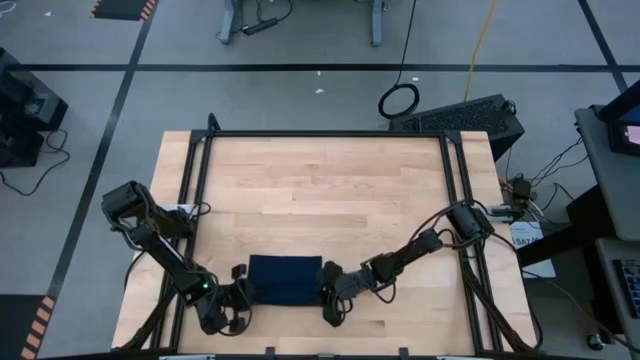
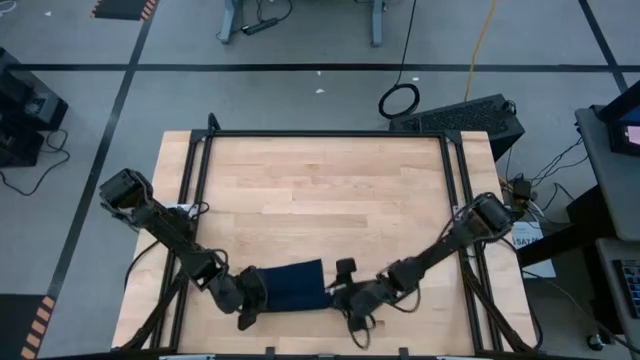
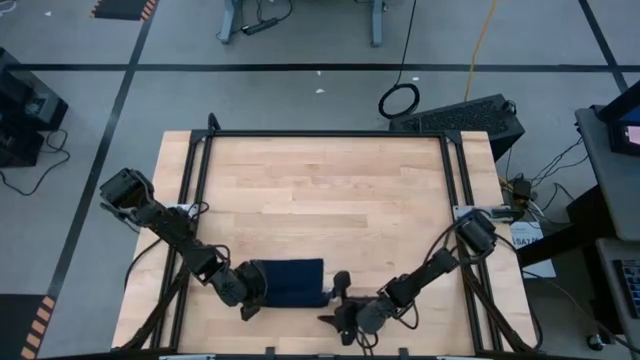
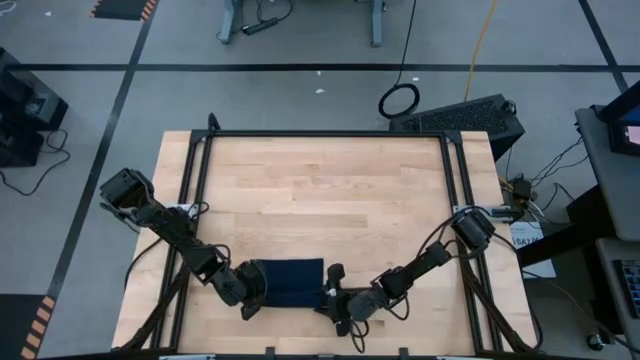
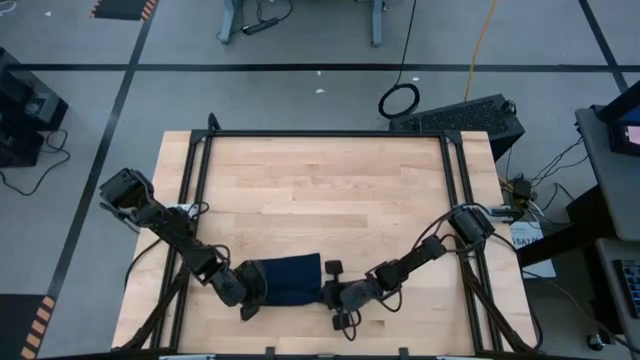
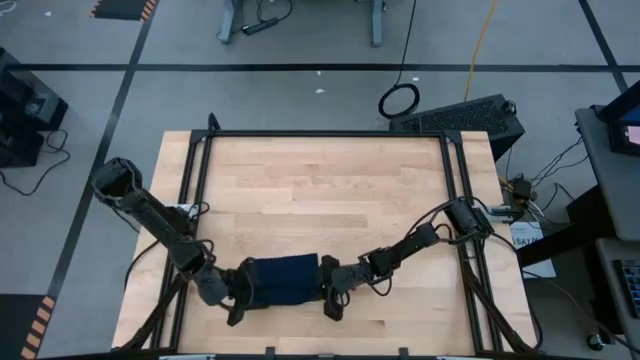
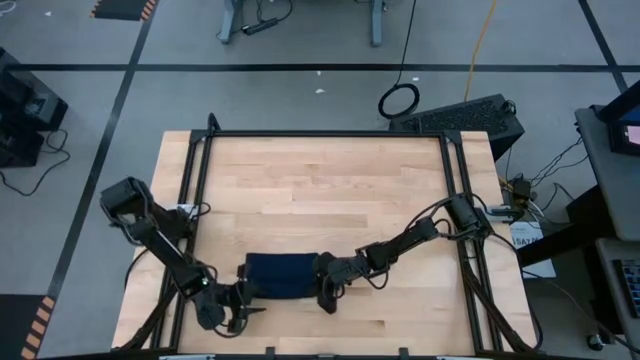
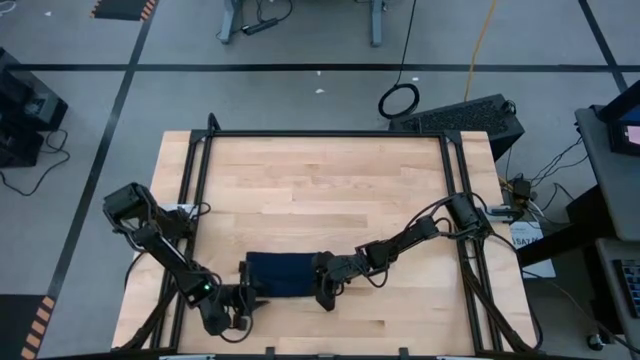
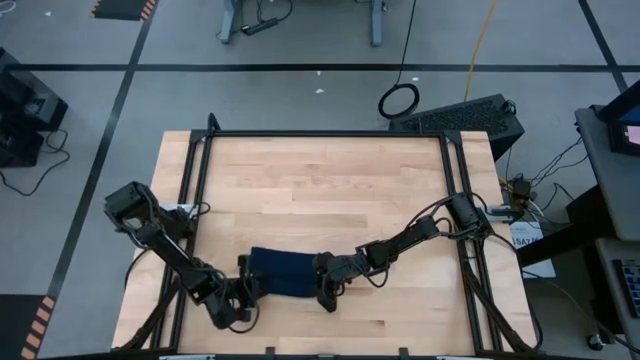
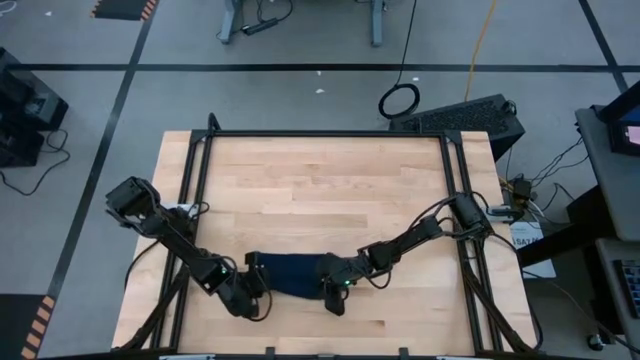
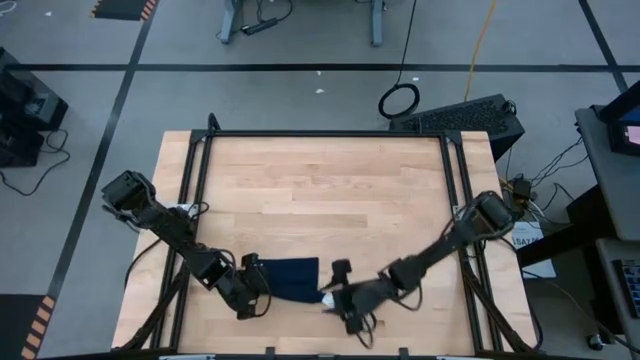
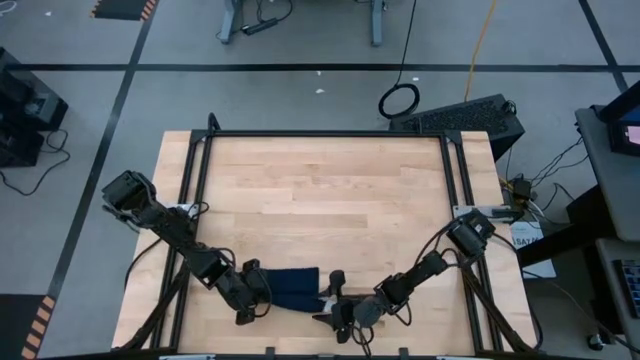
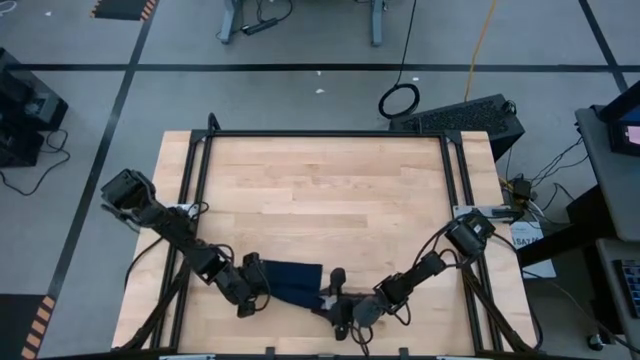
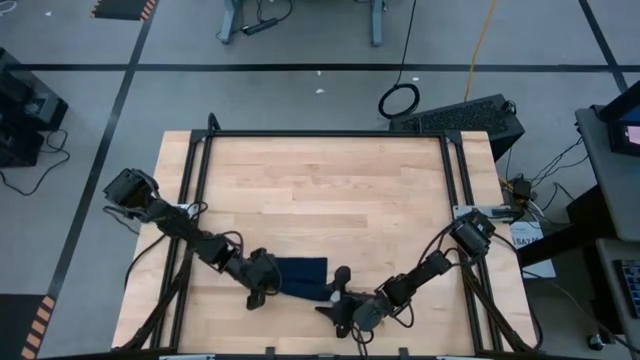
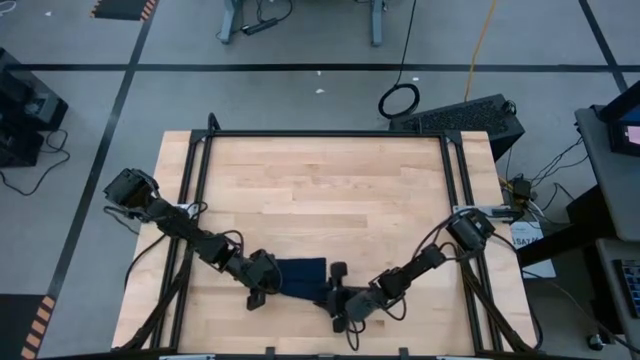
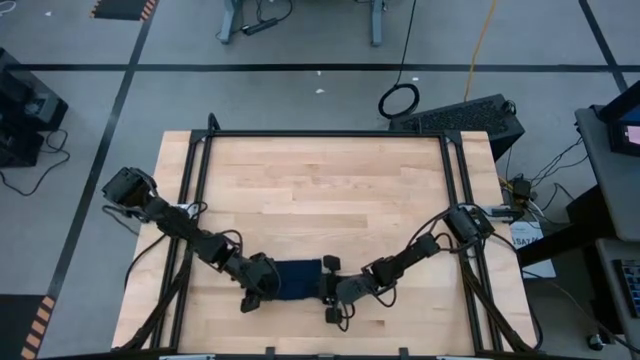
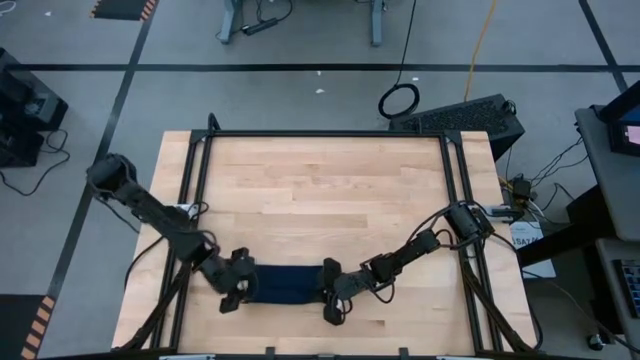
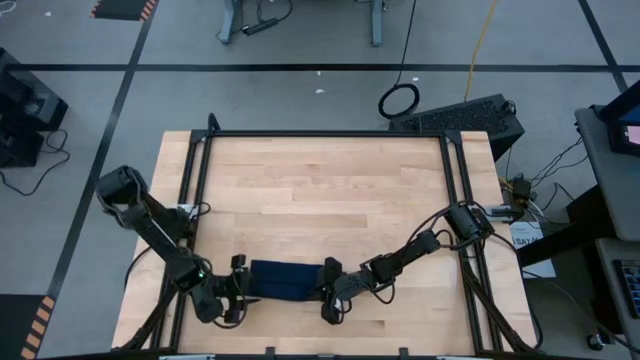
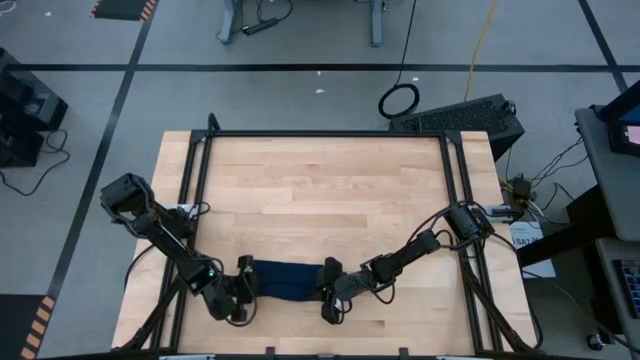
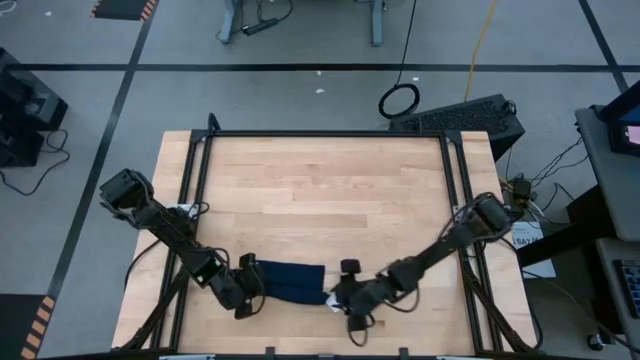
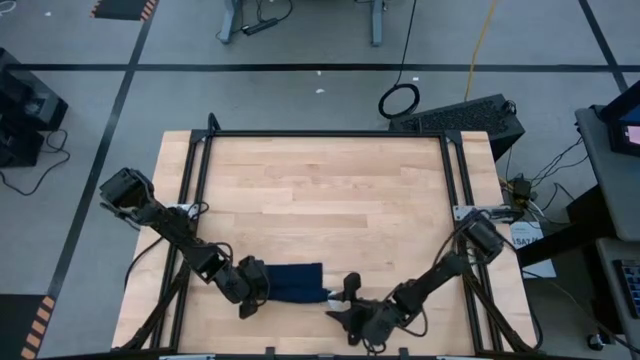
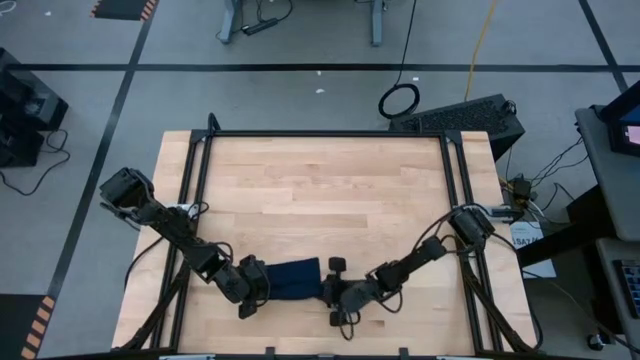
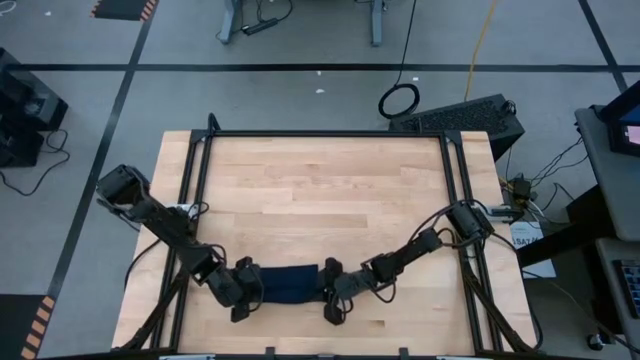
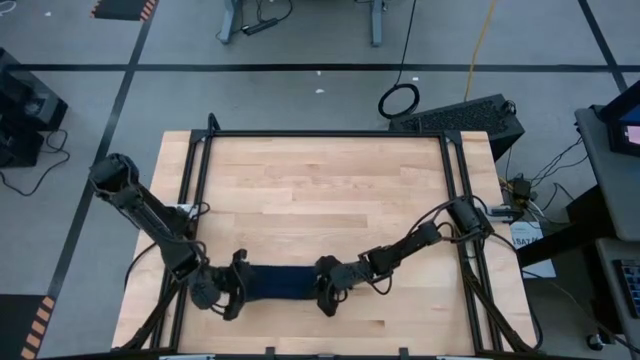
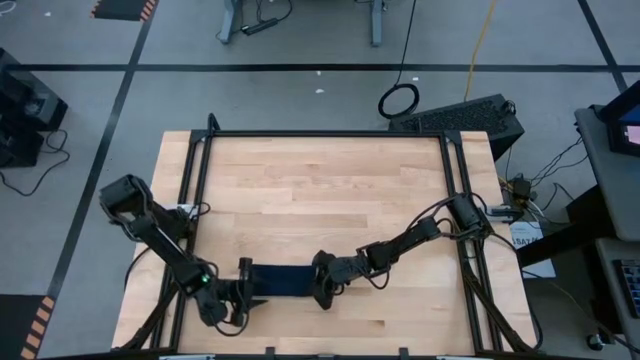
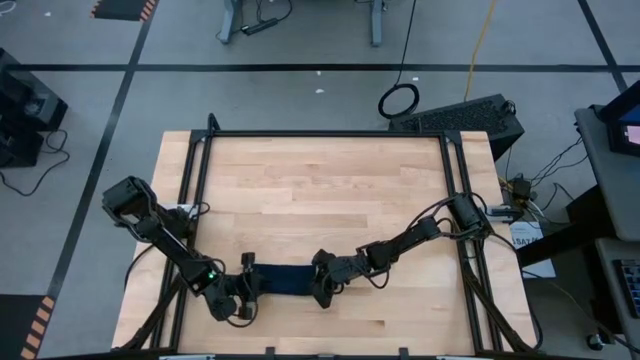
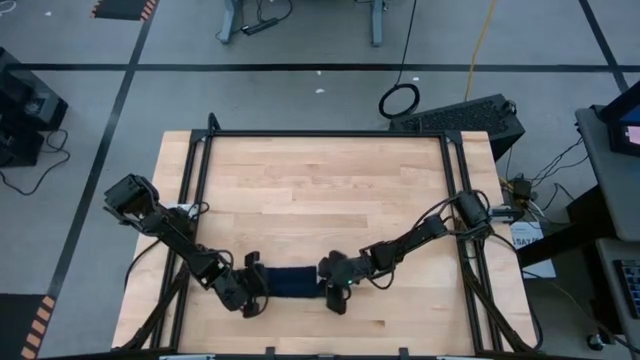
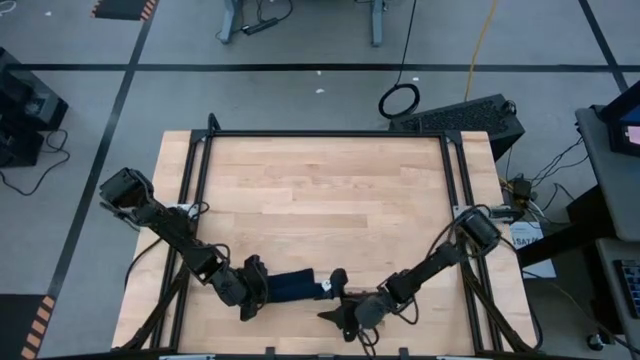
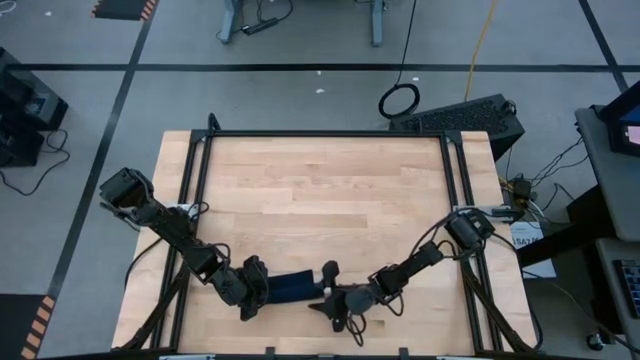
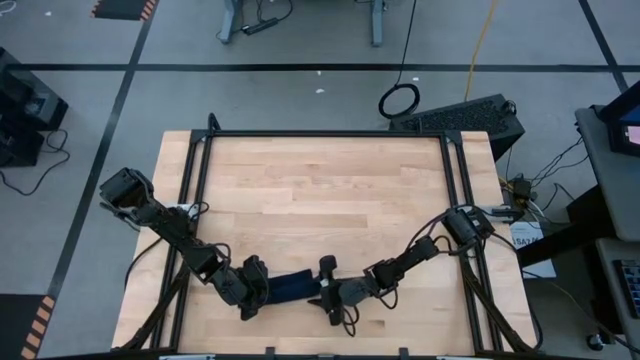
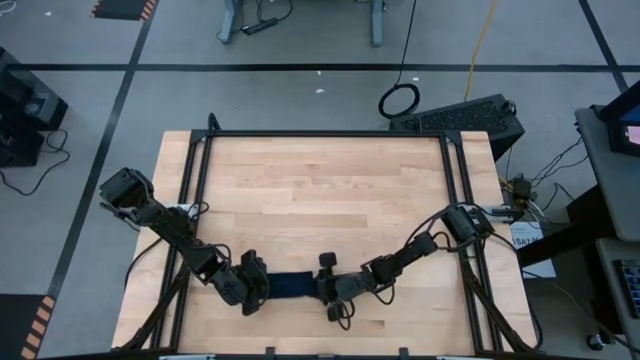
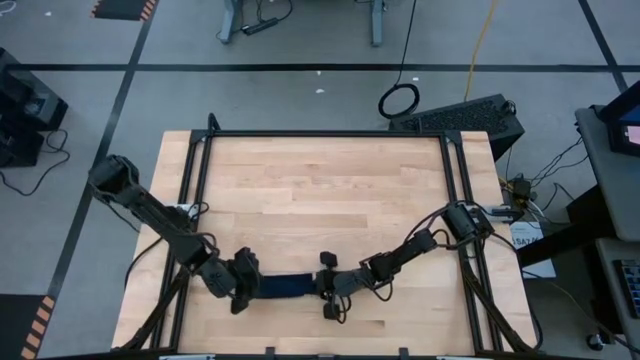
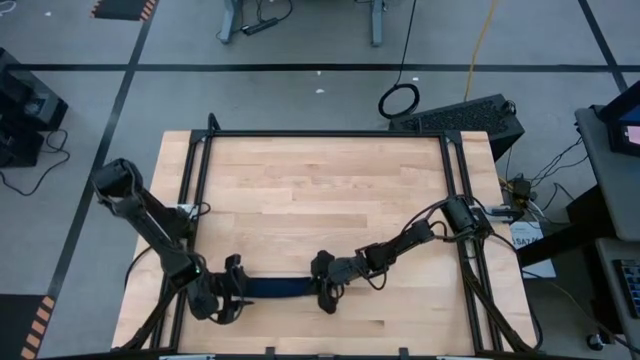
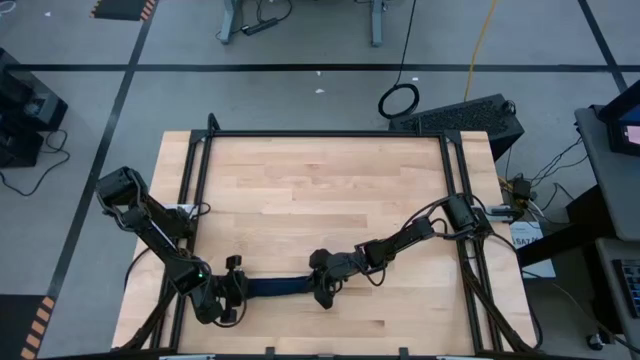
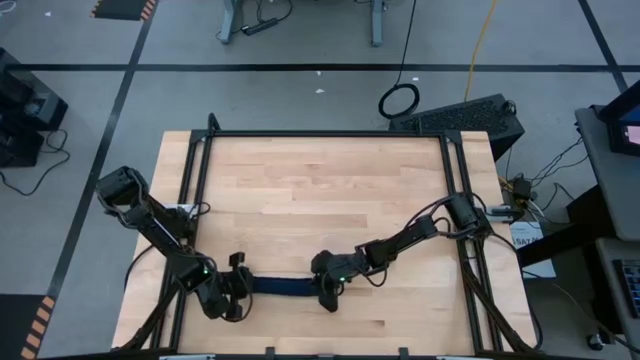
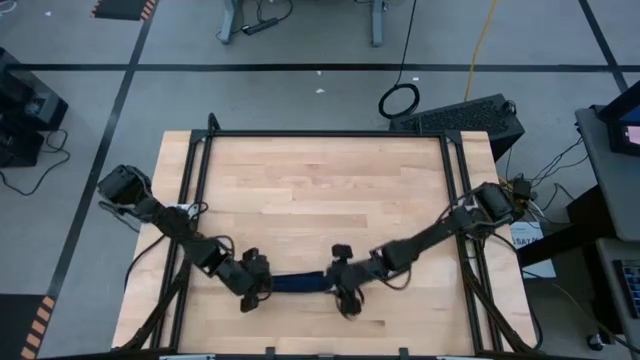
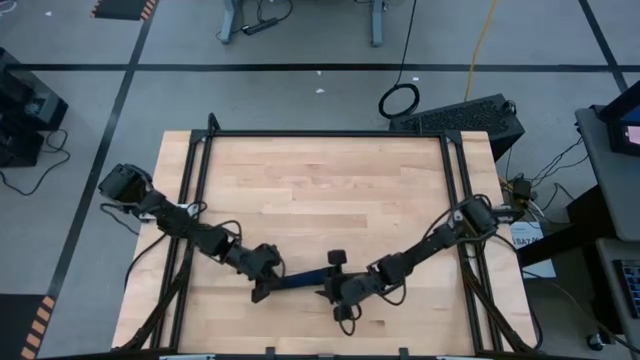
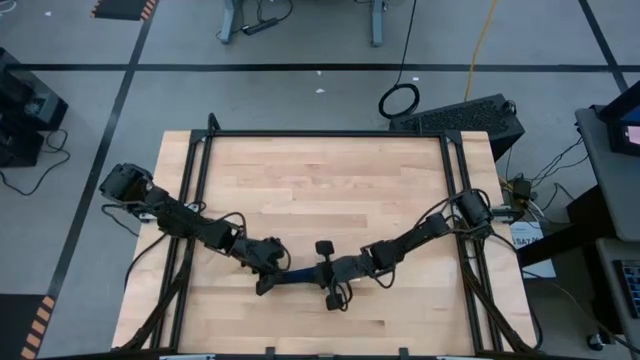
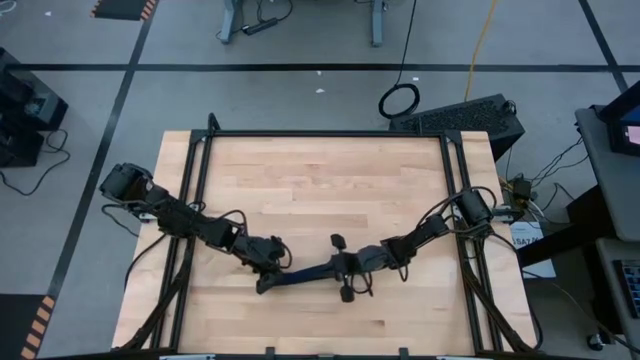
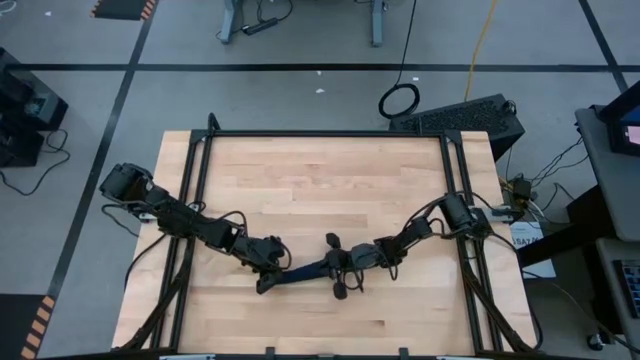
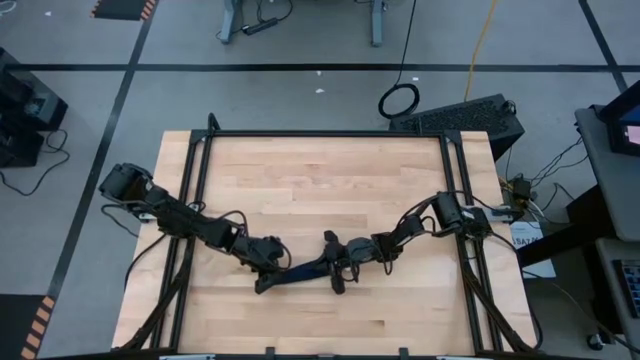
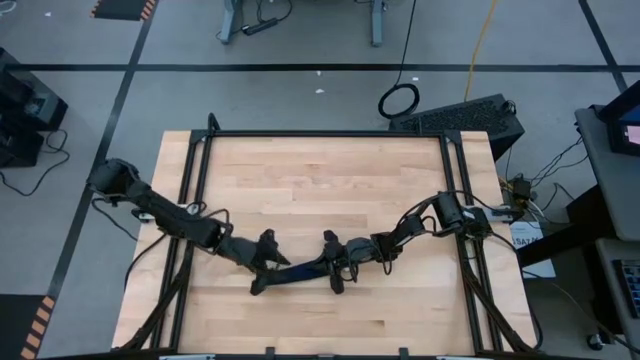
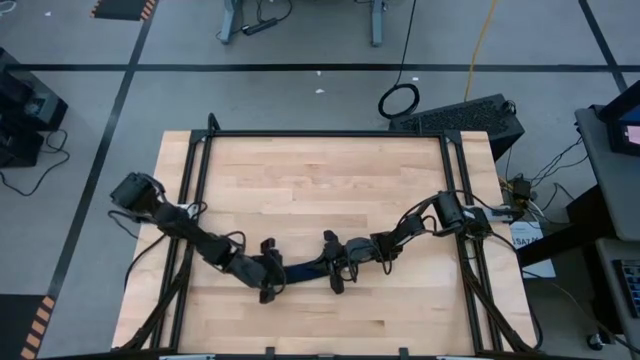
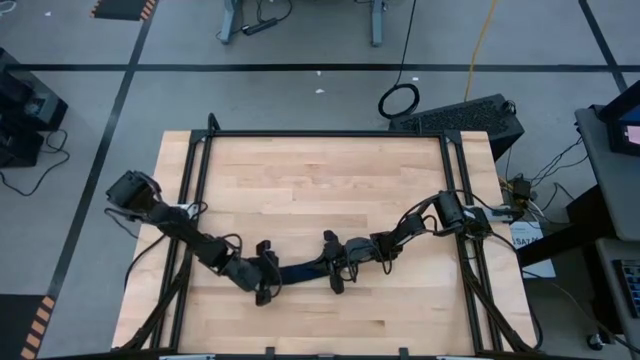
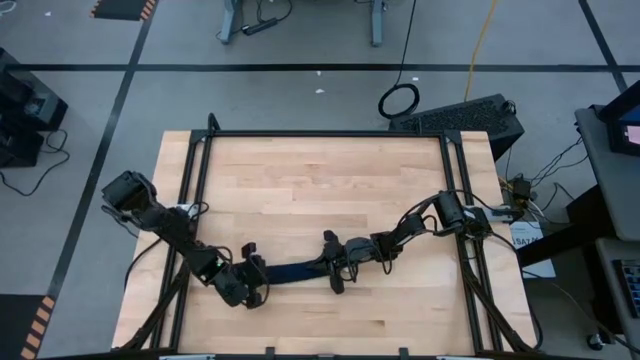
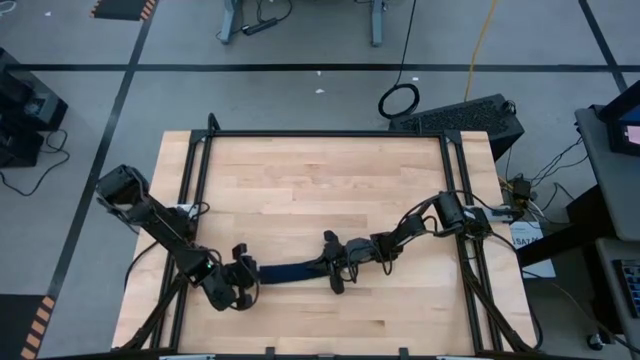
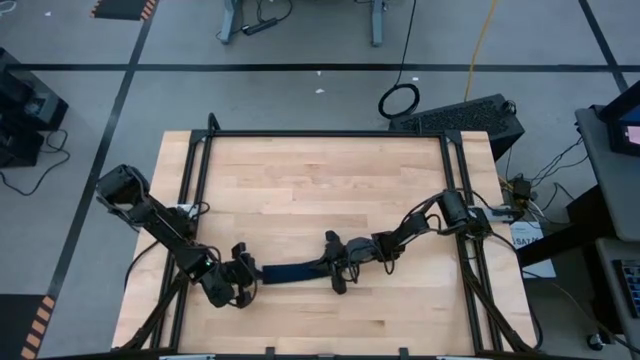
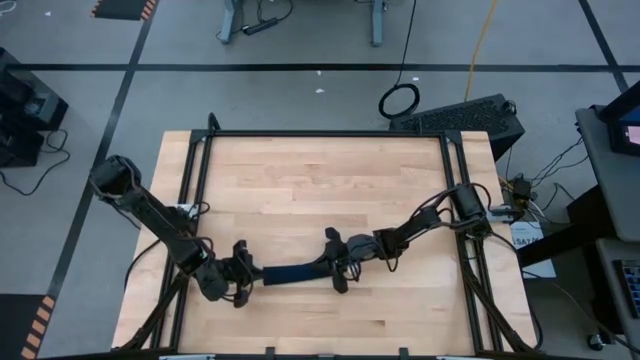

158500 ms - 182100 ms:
Task: Roll towel
Roll the dark blue towel
